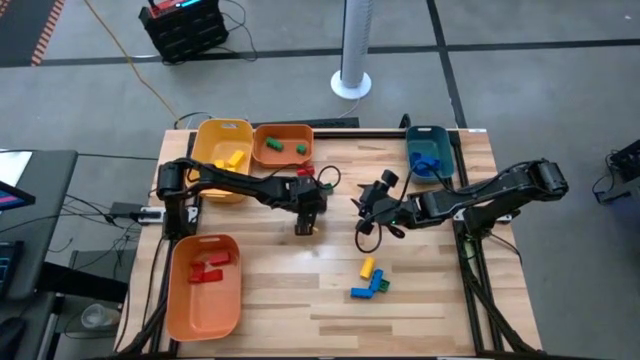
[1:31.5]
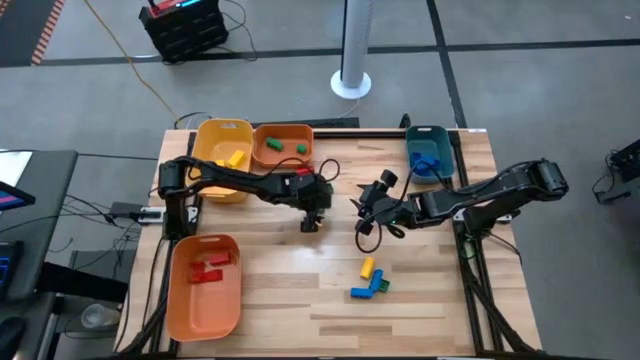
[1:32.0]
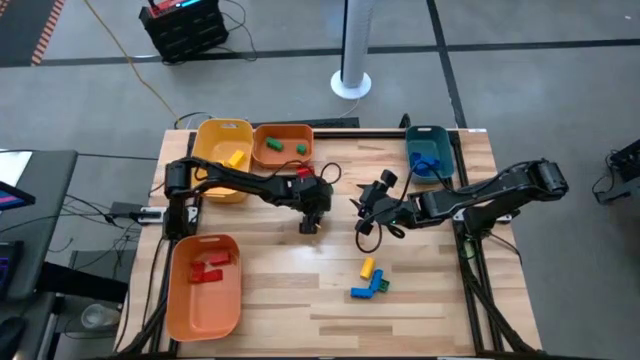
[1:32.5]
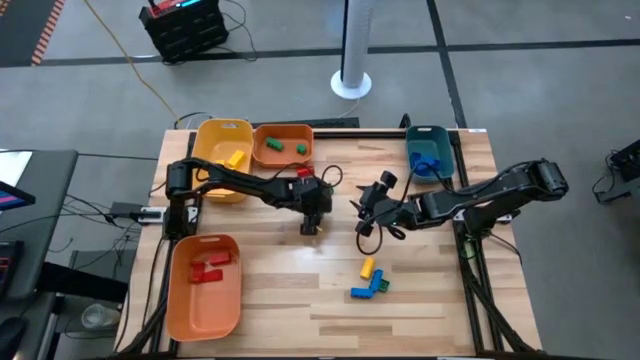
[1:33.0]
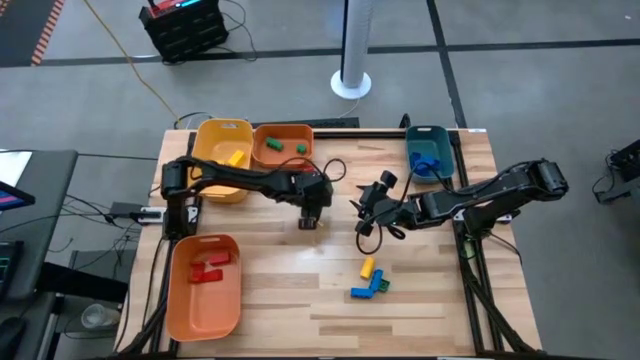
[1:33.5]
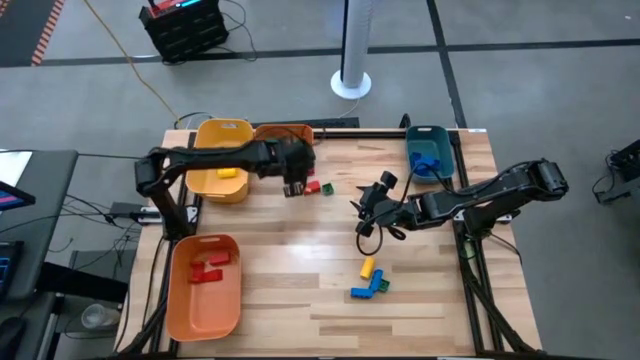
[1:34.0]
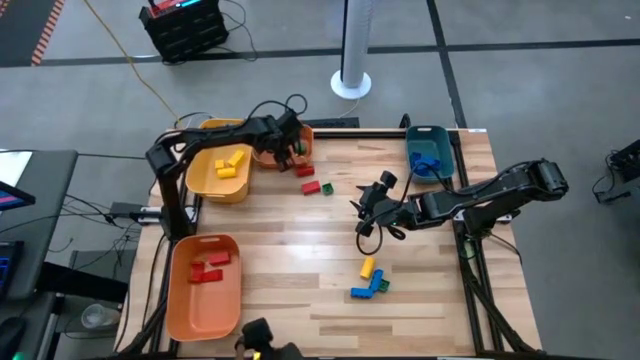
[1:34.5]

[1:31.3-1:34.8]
Task: Sort blocks
Put the green game piece into the top orange bin

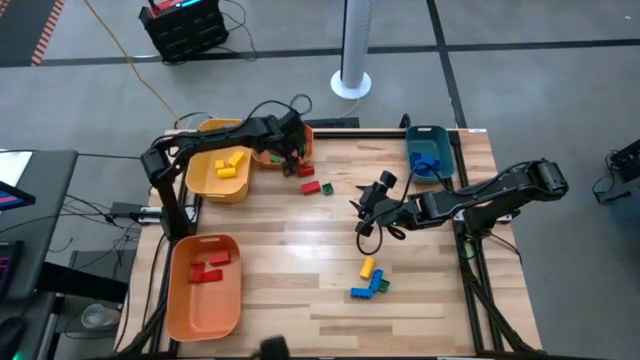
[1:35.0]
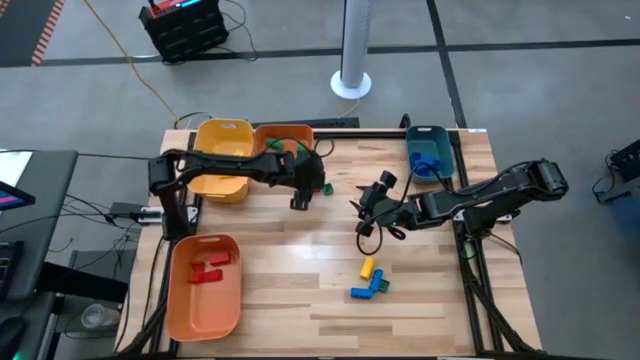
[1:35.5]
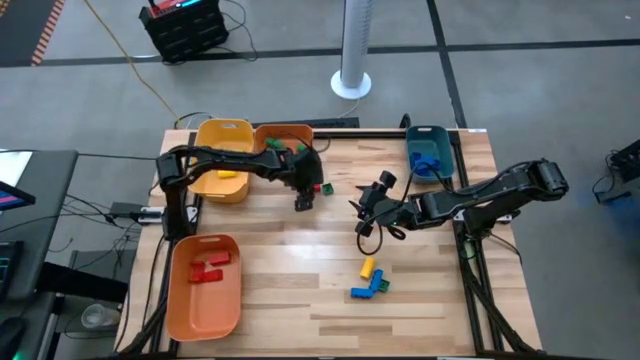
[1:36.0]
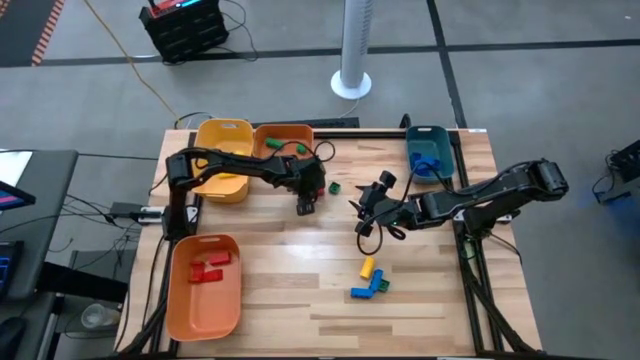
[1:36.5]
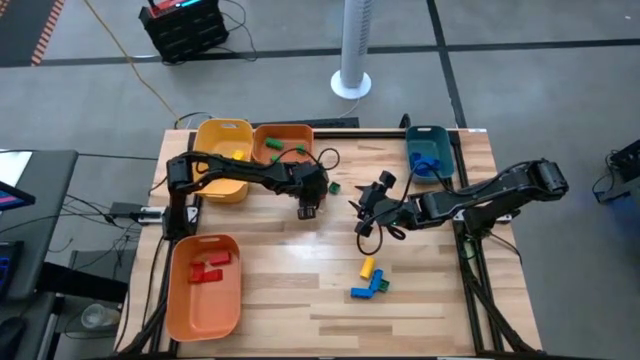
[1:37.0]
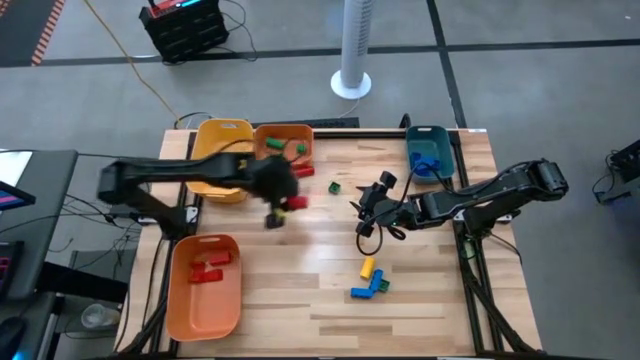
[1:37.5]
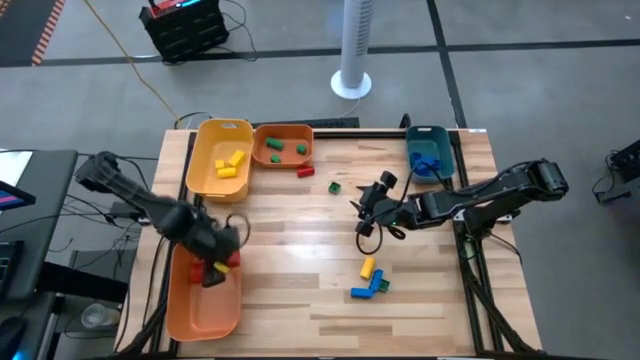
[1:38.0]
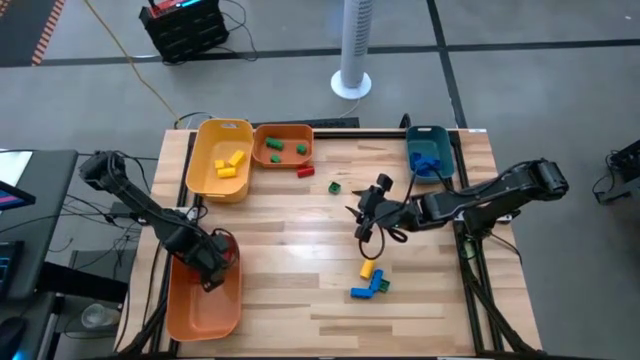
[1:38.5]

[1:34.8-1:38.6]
Put the red wooden block into the bottom orange bin

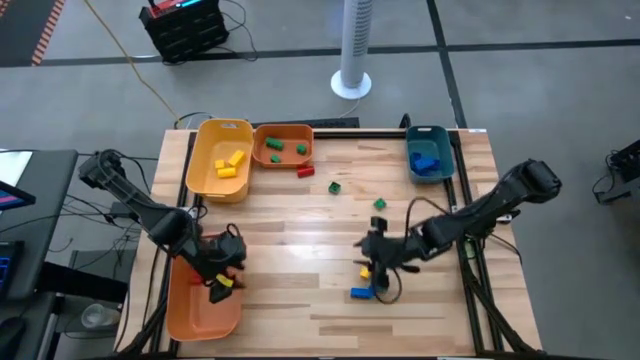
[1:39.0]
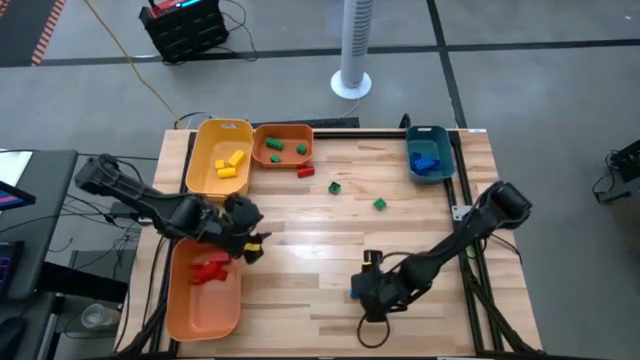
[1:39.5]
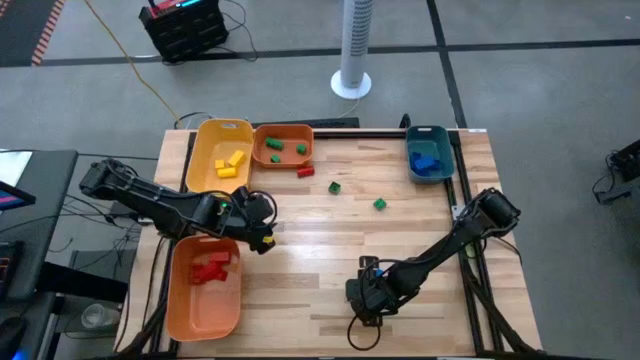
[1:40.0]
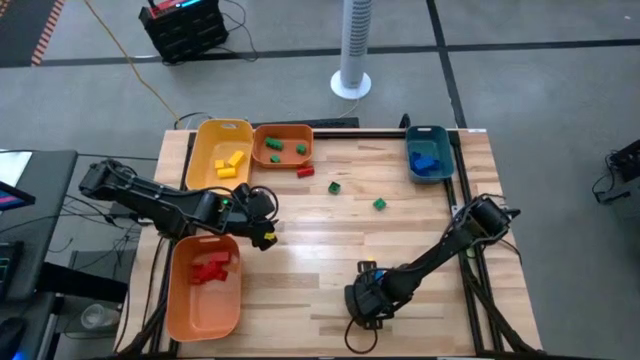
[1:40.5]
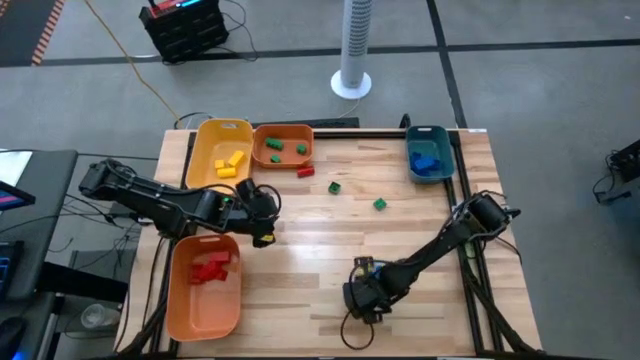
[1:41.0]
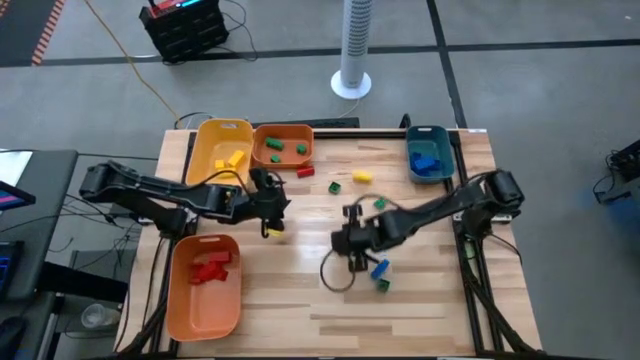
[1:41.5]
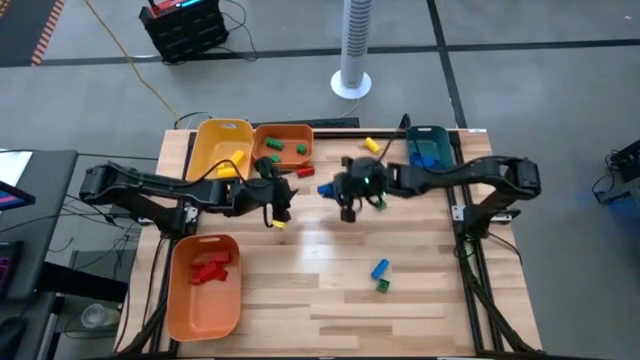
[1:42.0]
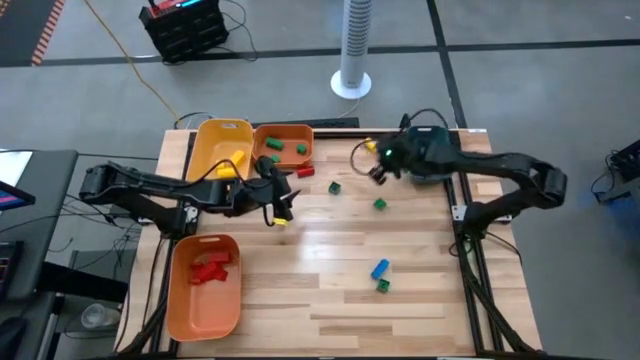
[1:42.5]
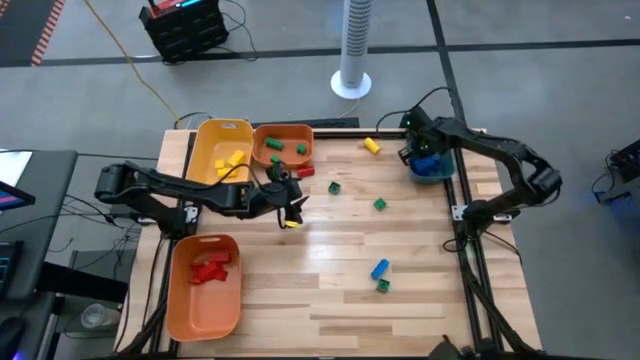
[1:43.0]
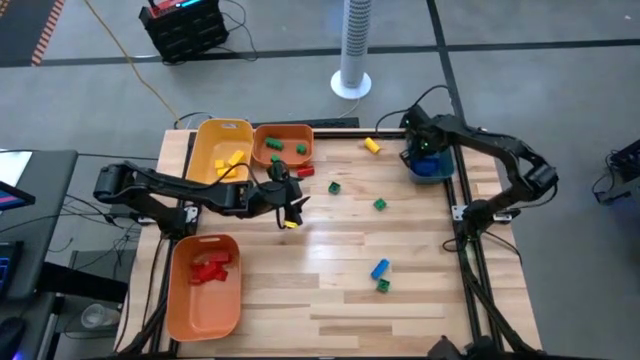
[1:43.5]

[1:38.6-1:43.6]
Put the blue game piece into the blue bin

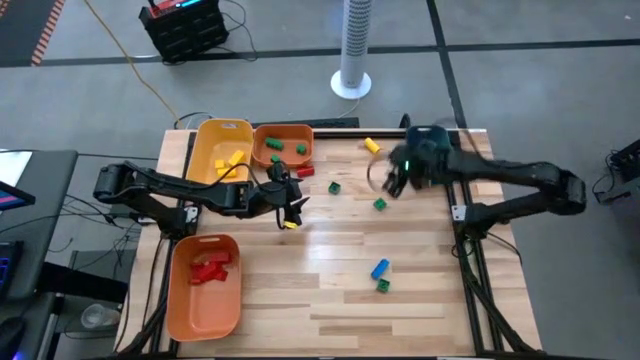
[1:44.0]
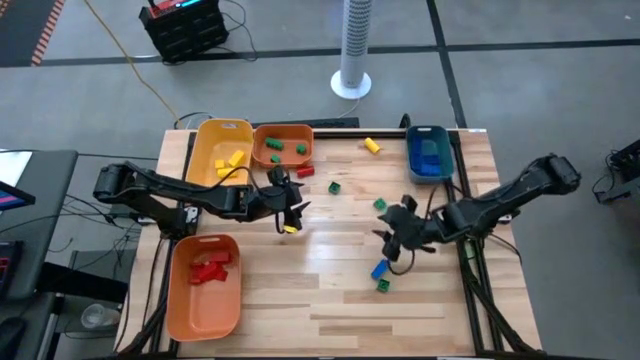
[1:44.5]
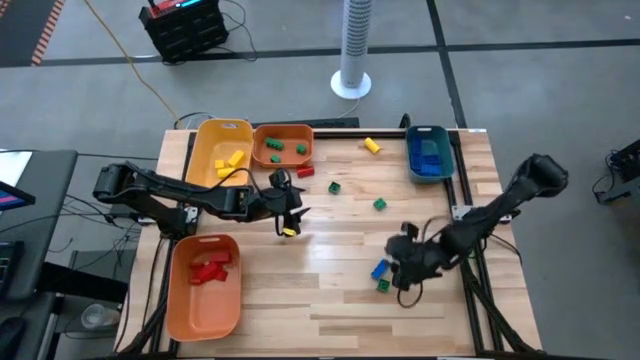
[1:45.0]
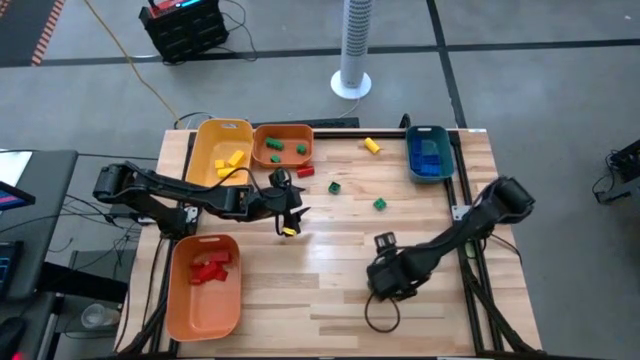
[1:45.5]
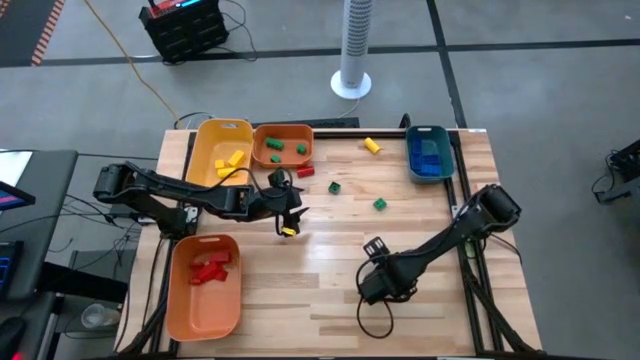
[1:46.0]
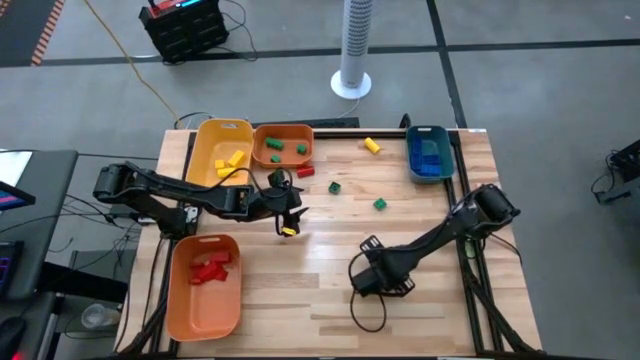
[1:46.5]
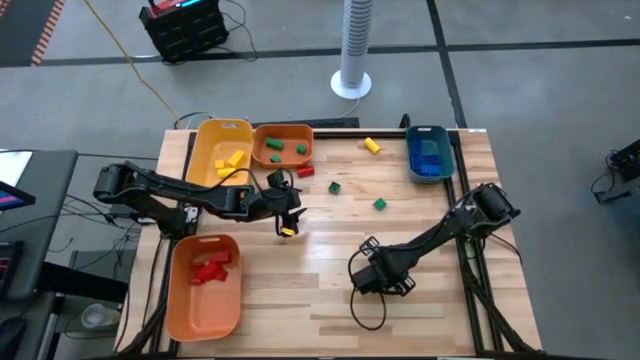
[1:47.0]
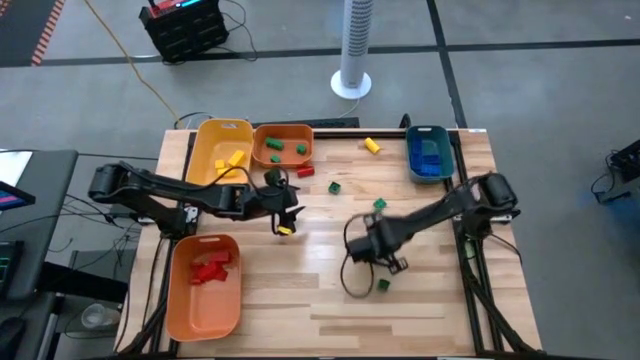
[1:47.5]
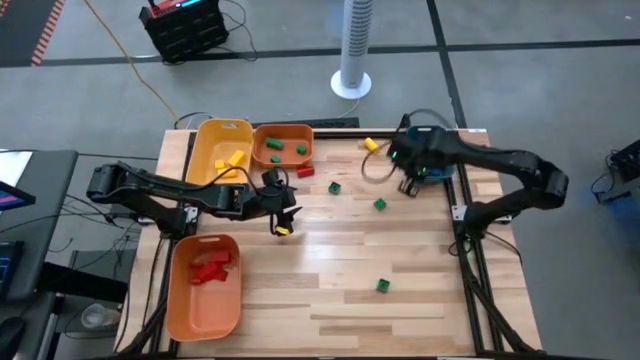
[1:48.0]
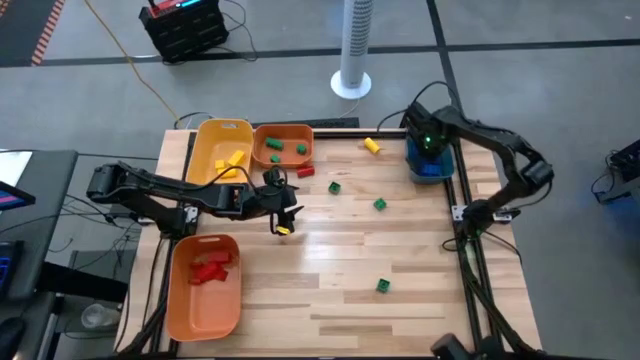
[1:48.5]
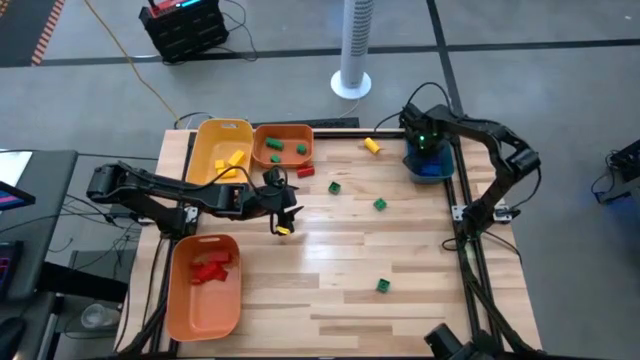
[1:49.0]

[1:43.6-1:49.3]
Put the blue game piece into the blue bin

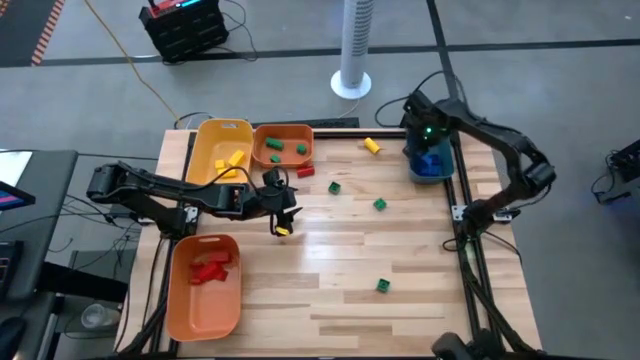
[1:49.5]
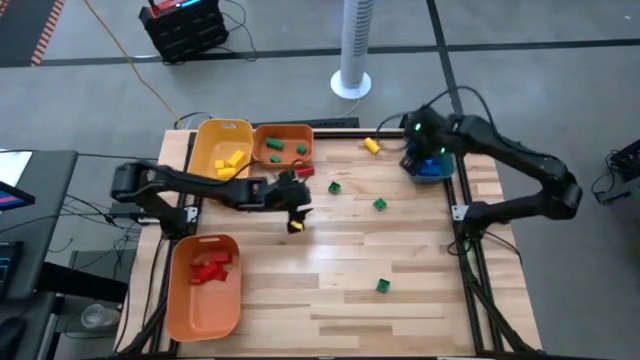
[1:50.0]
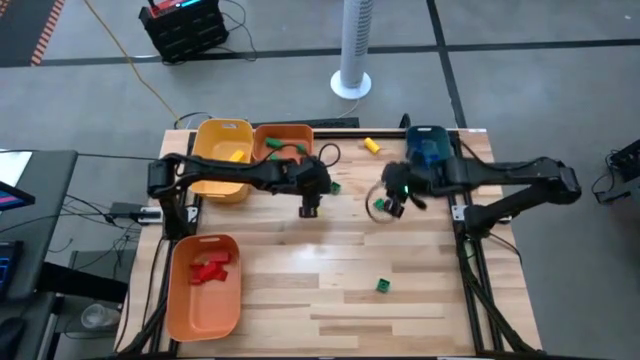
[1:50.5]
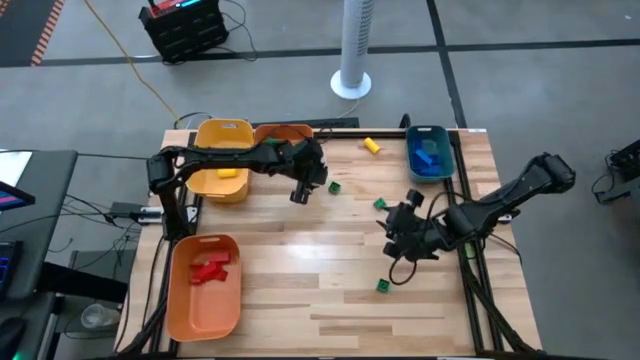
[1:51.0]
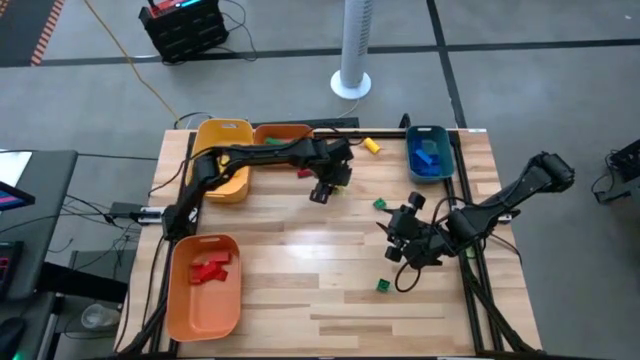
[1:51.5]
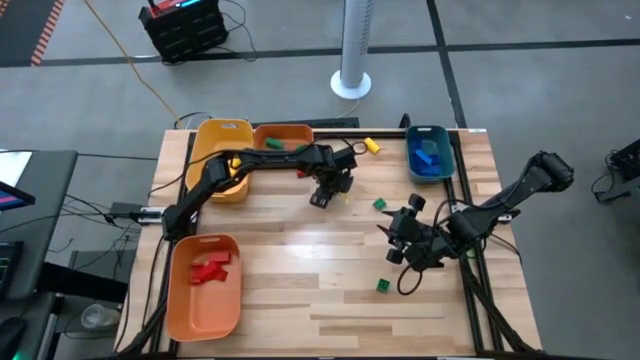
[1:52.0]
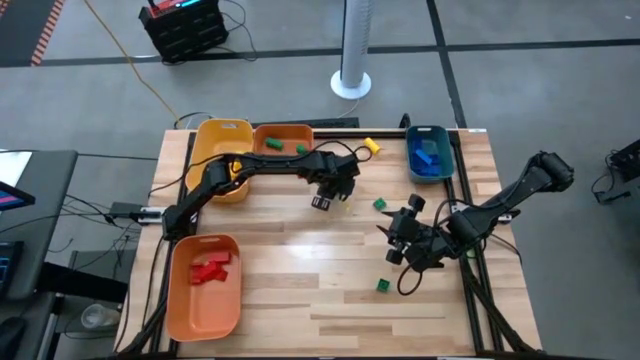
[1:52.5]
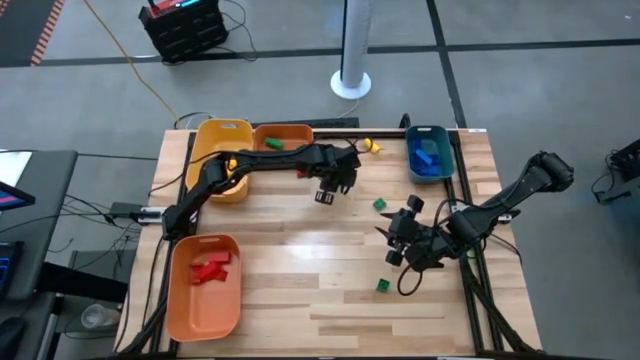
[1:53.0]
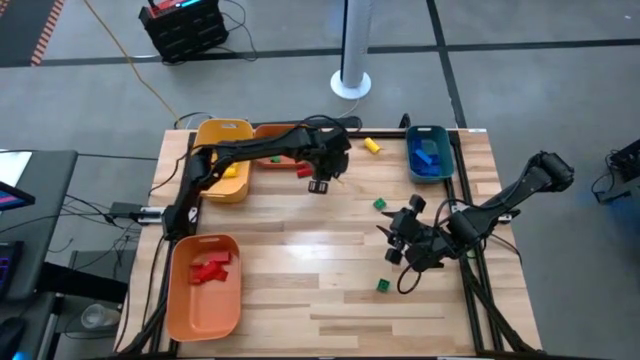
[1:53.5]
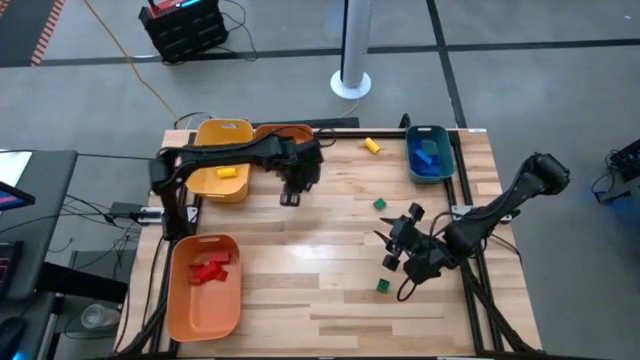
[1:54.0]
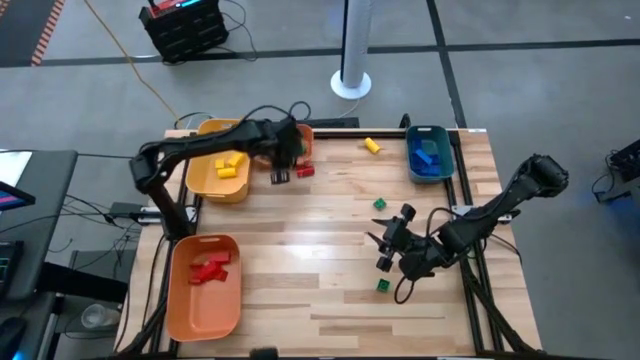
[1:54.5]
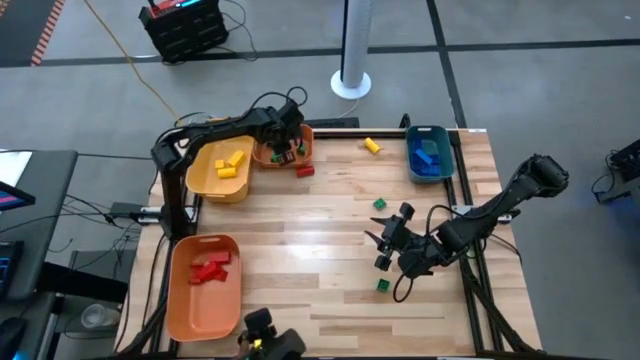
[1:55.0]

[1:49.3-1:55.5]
Put the green game piece into the top orange bin
